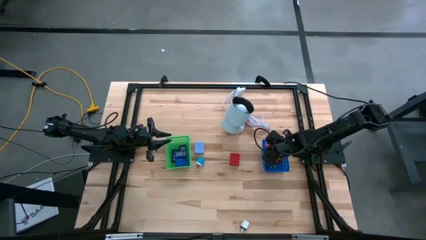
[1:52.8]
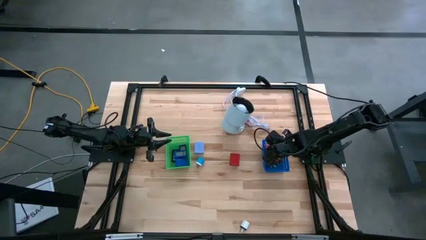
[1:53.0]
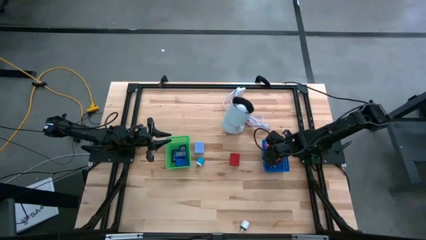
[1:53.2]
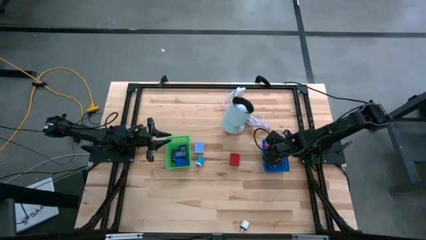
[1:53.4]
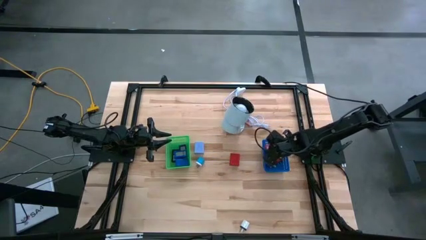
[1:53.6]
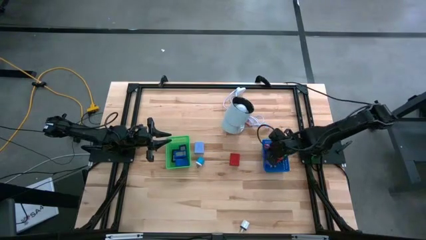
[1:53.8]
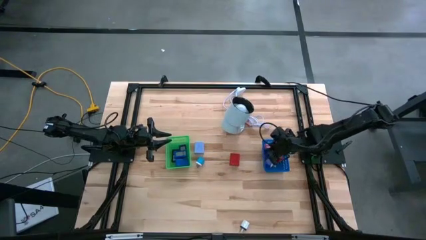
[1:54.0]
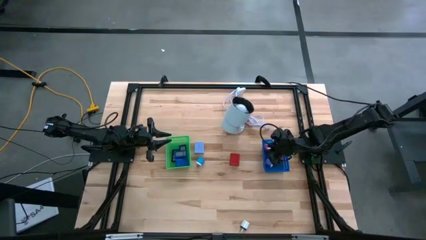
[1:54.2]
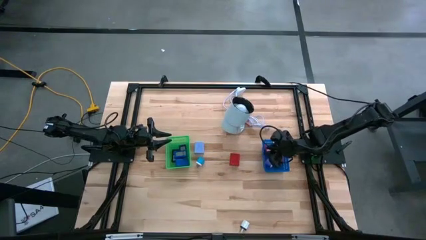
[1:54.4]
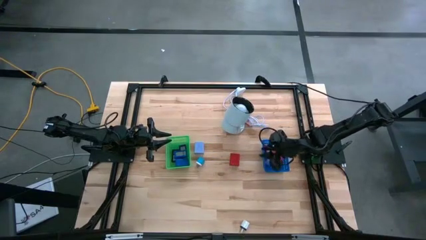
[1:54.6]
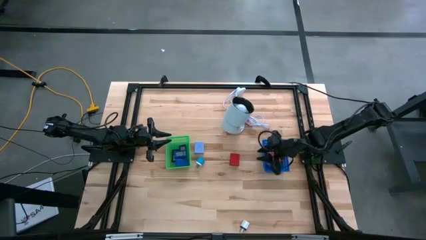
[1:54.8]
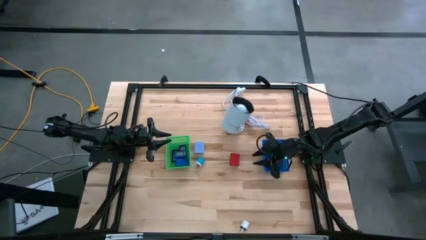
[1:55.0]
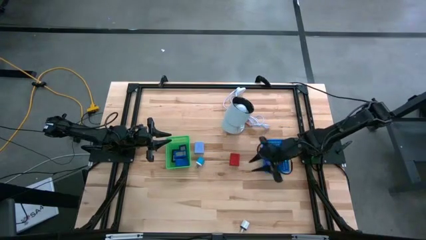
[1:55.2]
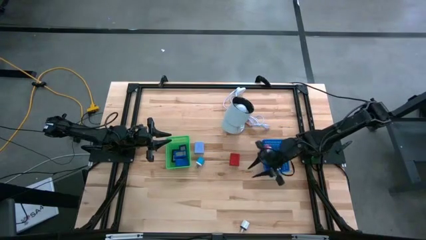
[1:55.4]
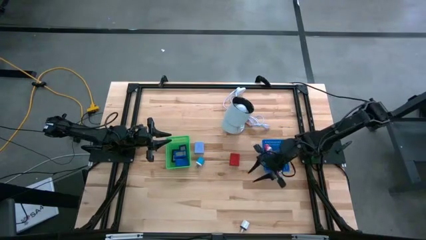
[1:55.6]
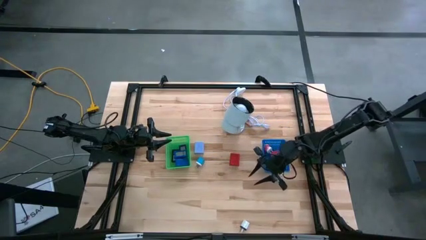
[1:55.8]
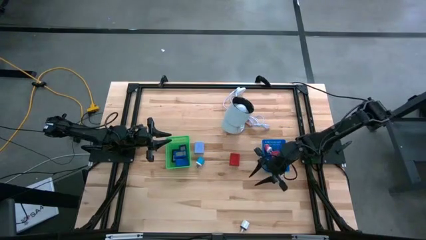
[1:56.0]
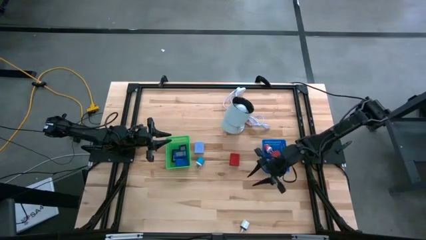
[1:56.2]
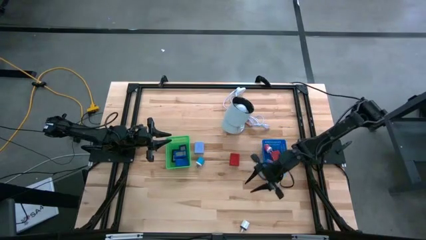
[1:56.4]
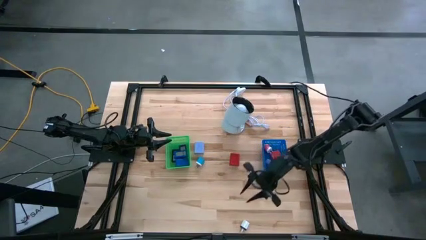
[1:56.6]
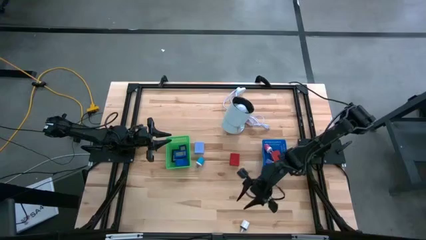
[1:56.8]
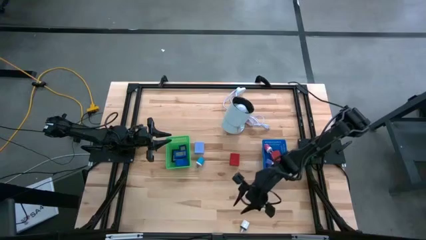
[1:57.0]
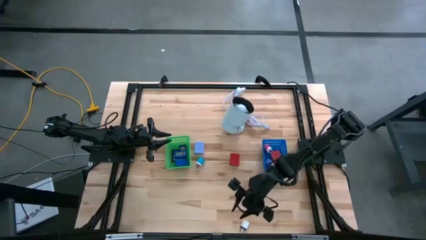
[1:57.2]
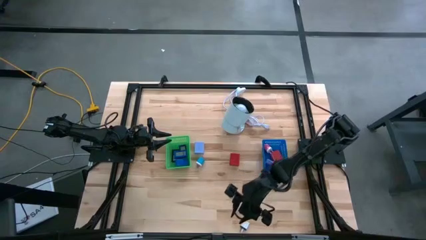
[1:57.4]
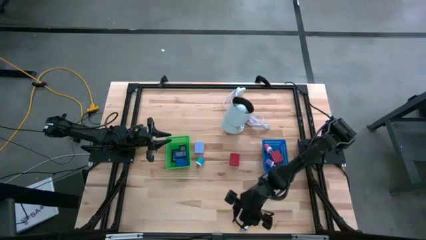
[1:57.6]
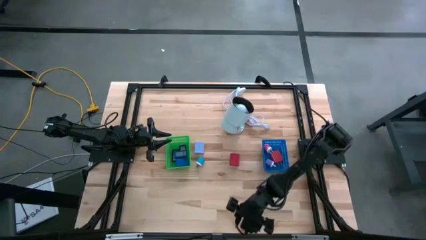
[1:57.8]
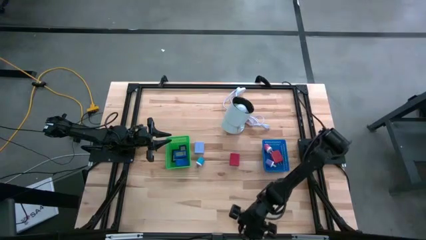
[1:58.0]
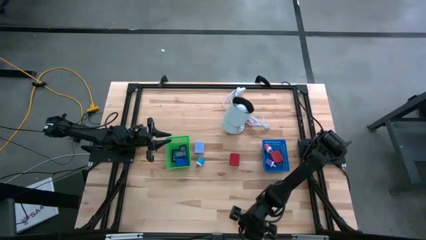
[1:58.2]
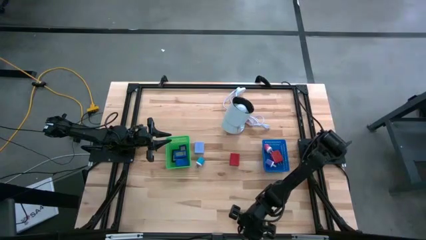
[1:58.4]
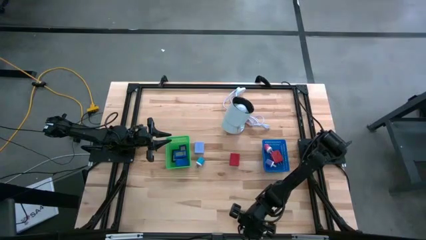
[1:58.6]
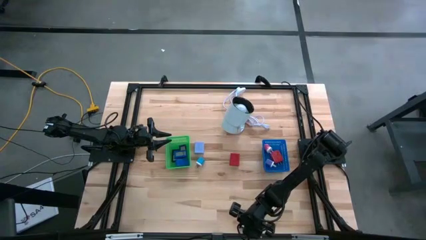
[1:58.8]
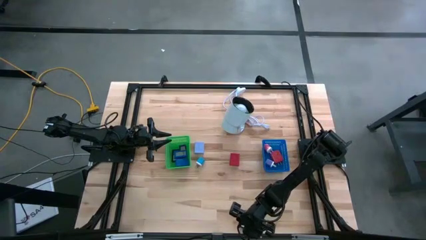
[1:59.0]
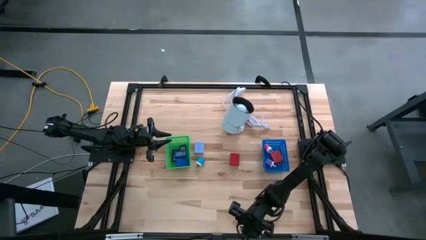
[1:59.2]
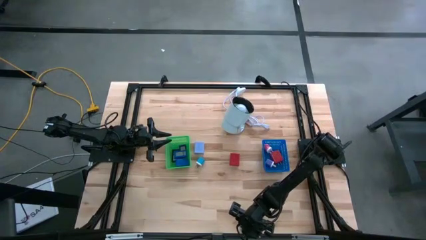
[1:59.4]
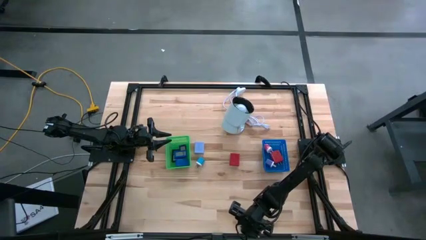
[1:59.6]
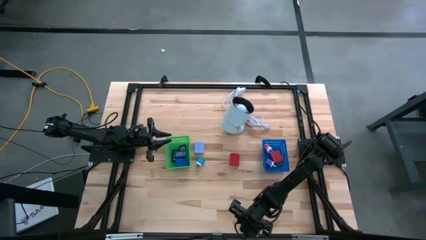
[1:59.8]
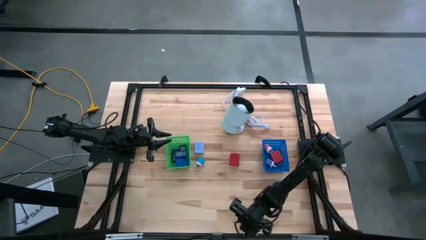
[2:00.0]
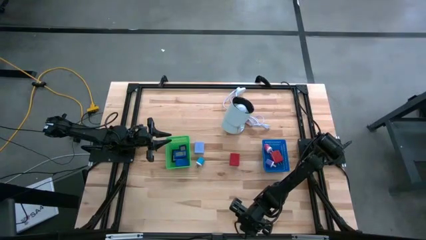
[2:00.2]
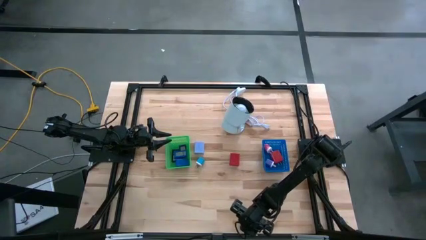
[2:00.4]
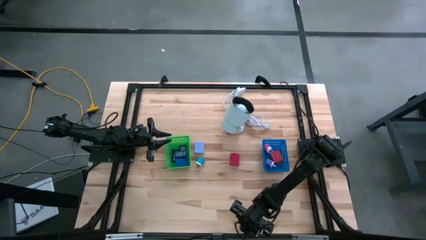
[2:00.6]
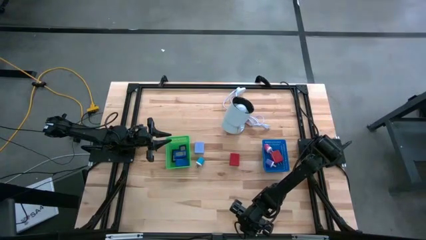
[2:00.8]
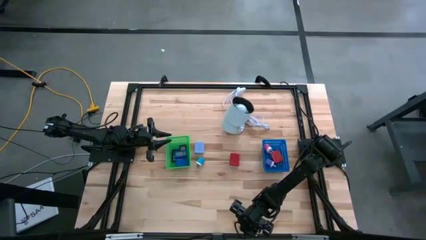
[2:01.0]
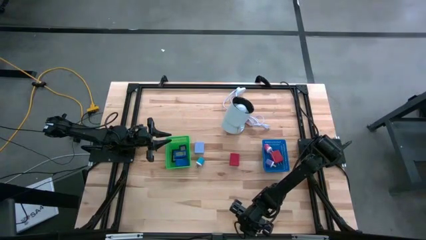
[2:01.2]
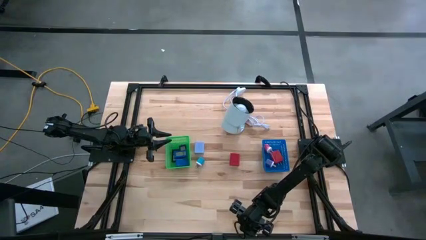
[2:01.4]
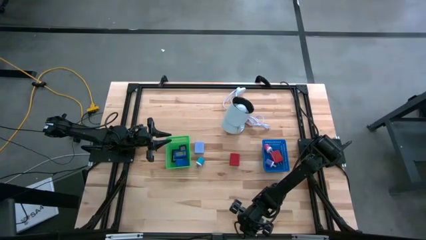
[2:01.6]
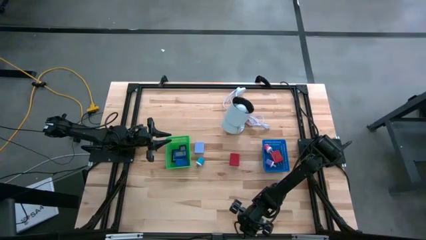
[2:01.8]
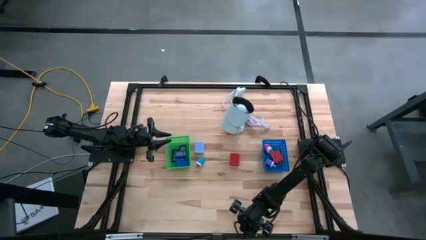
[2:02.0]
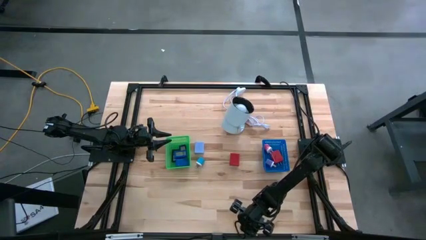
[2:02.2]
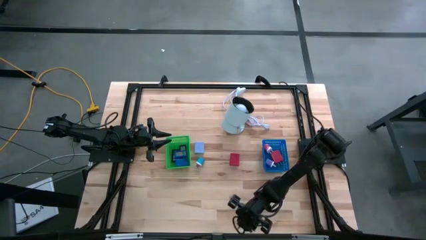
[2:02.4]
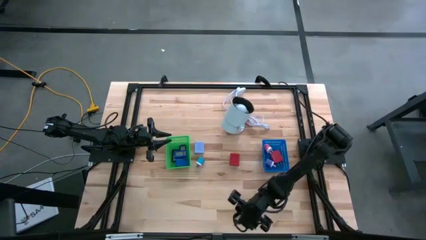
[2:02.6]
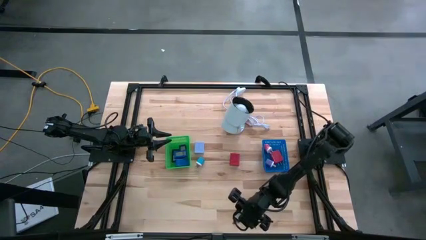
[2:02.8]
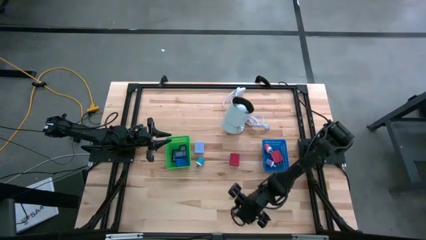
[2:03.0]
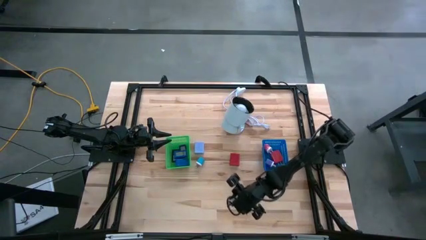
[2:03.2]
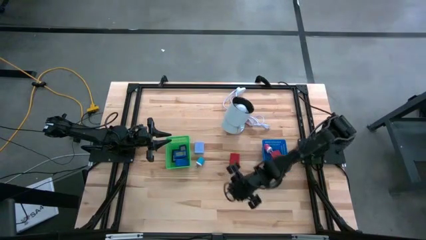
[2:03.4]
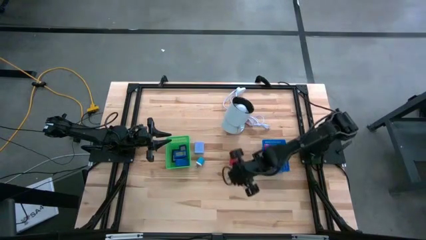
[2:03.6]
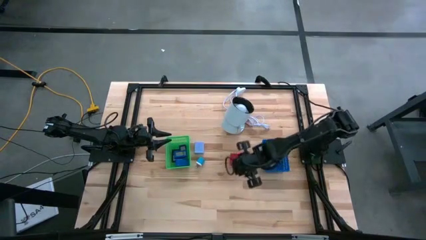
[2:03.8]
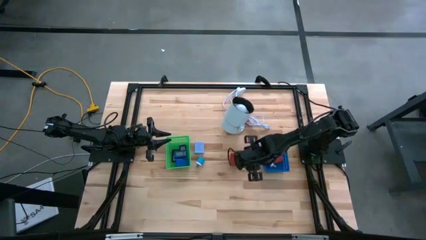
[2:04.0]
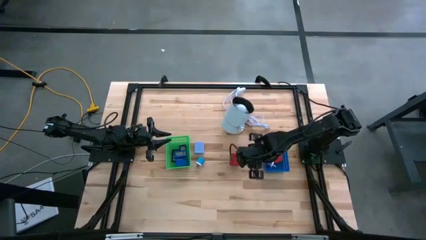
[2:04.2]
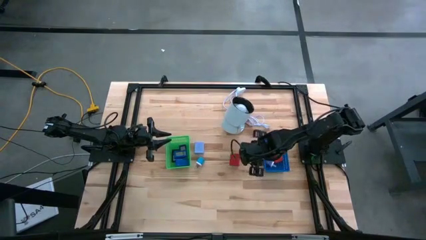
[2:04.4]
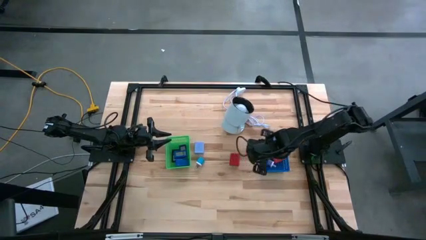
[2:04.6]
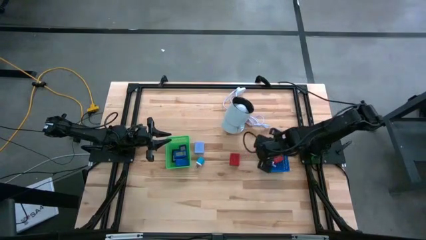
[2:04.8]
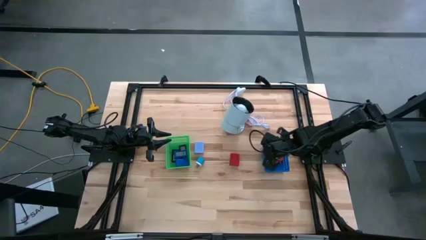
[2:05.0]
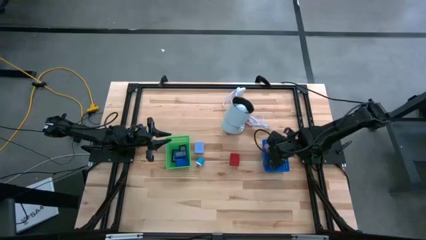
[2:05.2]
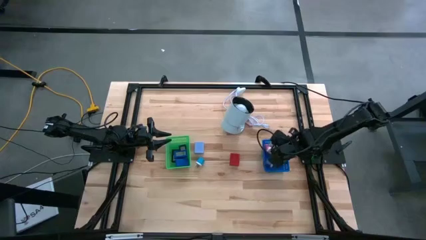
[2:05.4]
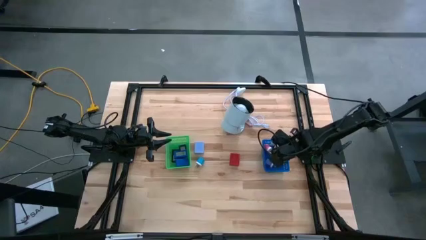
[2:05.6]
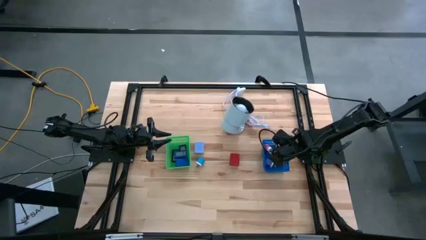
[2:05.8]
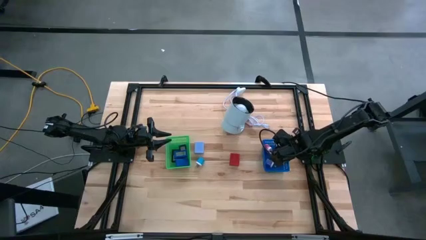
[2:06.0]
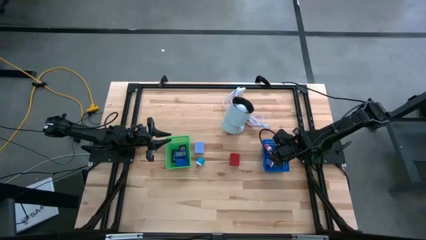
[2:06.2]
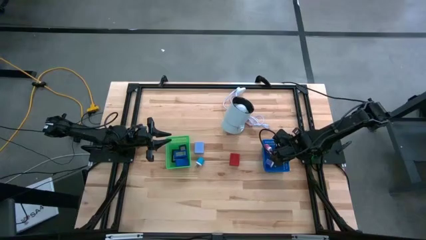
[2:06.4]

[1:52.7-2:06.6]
Task: Pick & Place Office items
Put the white charger adapter into the blue bin

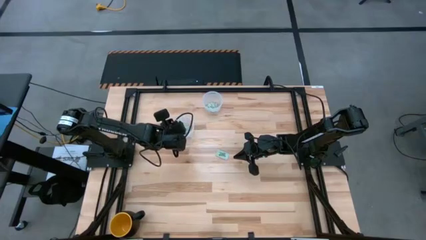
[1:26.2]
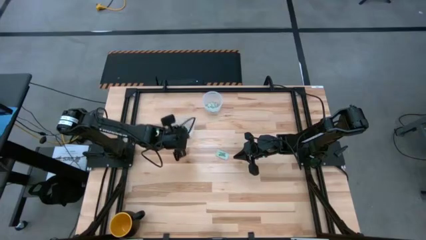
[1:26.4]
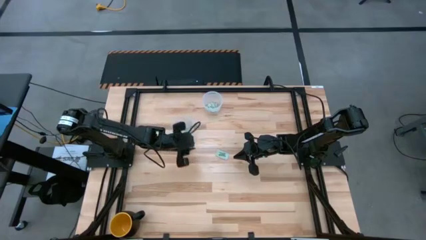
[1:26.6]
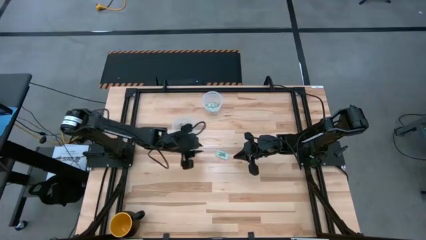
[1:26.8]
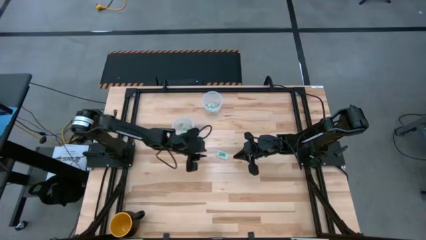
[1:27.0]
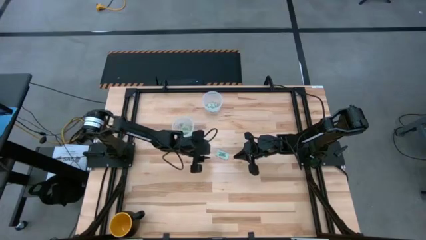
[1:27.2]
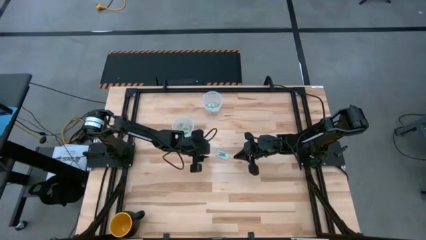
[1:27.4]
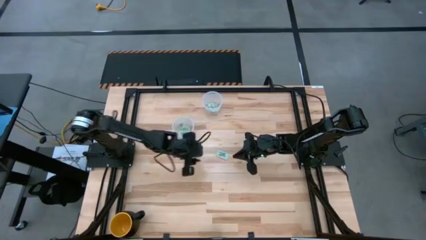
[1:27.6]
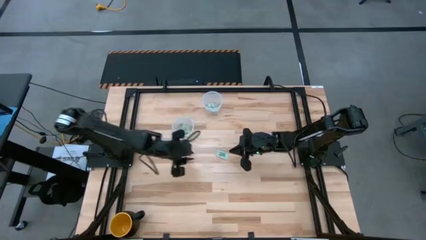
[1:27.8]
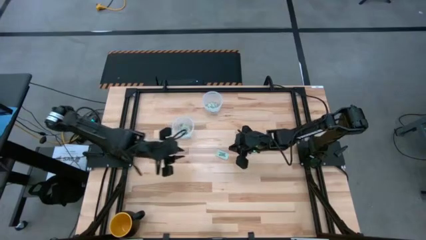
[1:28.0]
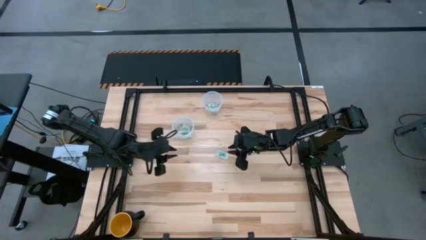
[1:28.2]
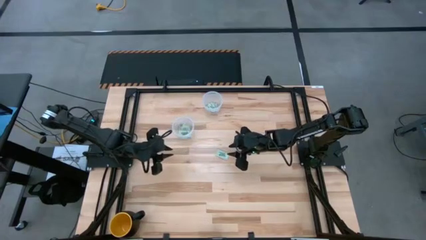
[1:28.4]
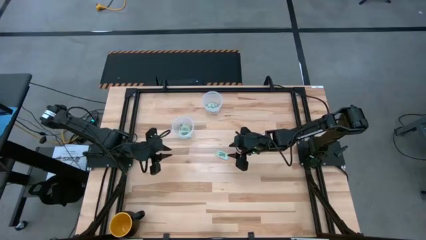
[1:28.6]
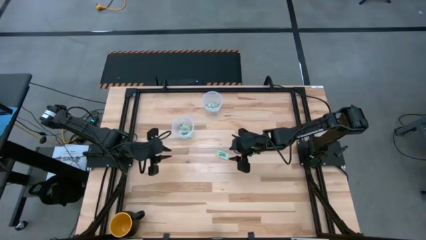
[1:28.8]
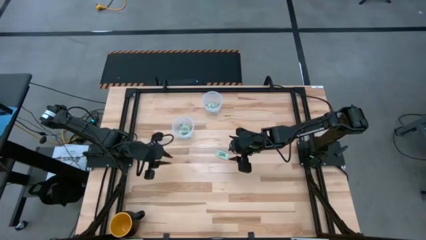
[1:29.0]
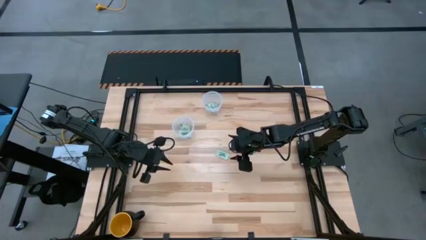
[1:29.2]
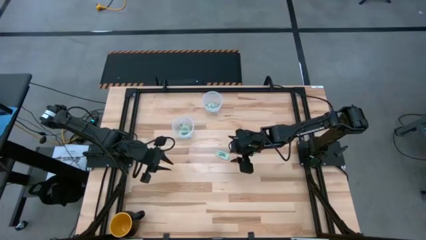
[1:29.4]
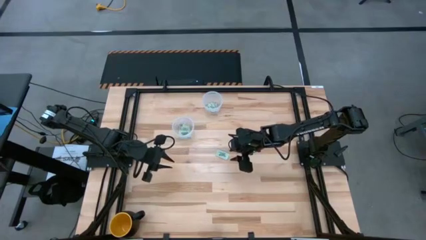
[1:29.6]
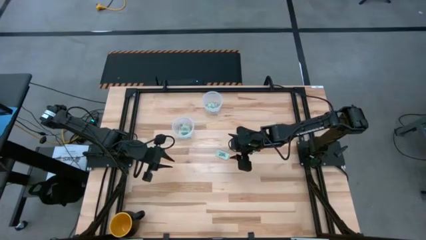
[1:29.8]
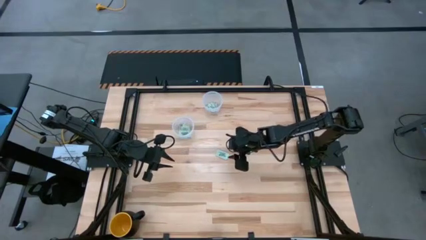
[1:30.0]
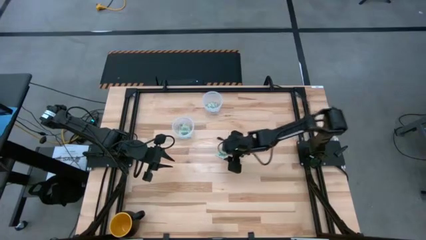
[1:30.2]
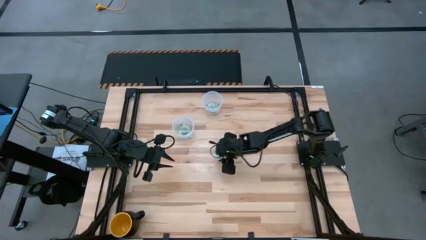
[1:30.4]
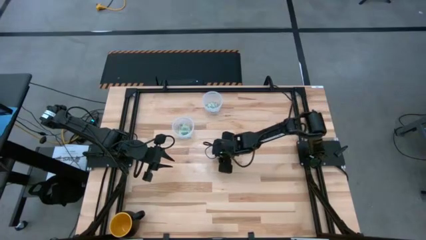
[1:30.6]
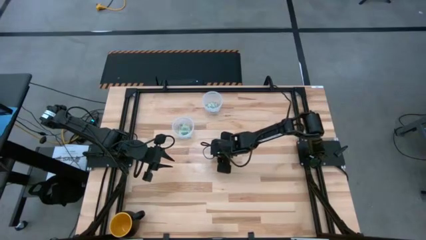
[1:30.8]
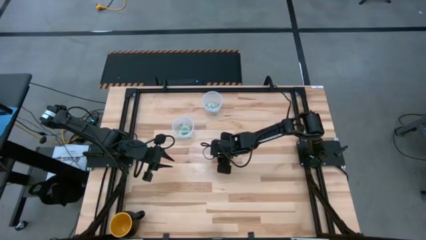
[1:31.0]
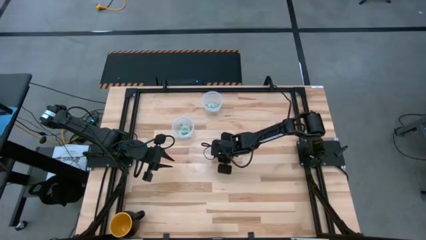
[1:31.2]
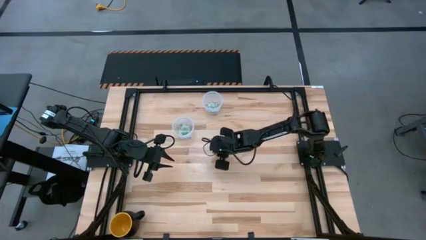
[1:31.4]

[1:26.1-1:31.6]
Task: Pick and place items into bin
Put the stevia packet into the top transparent bin
